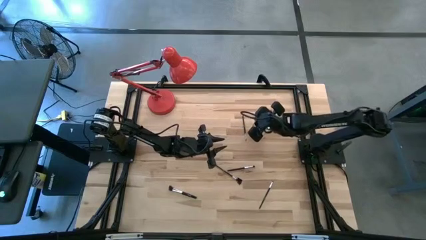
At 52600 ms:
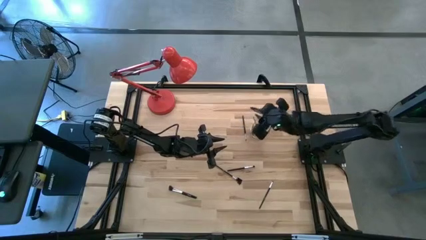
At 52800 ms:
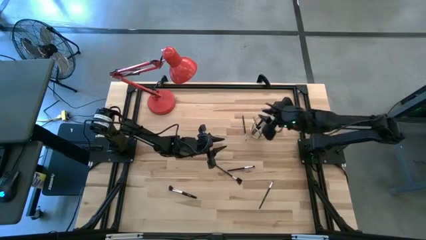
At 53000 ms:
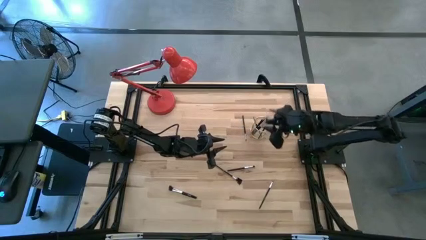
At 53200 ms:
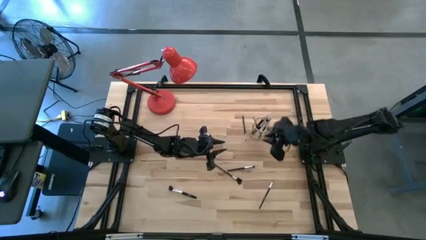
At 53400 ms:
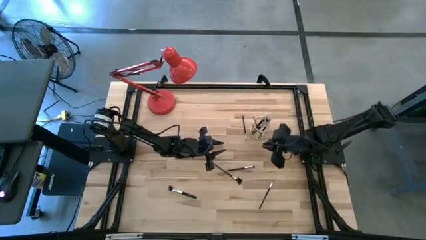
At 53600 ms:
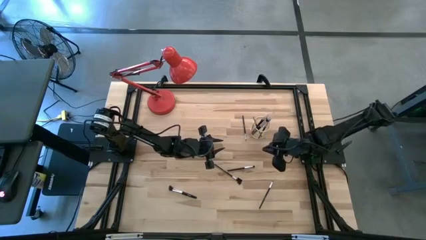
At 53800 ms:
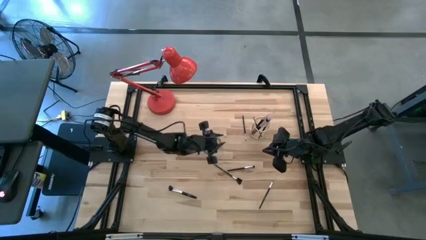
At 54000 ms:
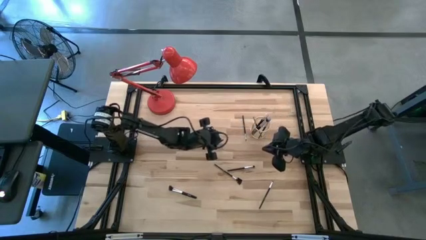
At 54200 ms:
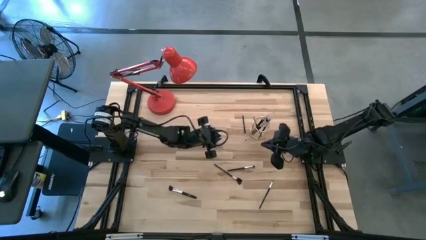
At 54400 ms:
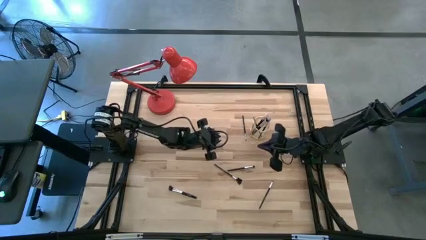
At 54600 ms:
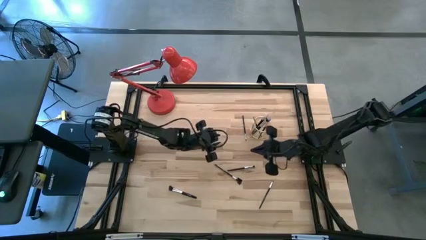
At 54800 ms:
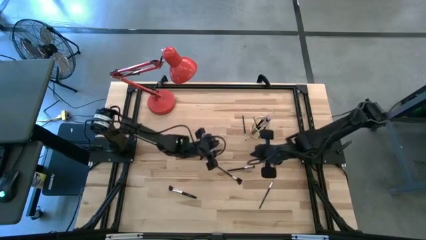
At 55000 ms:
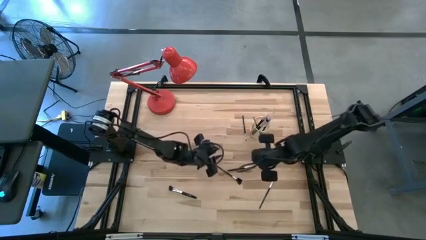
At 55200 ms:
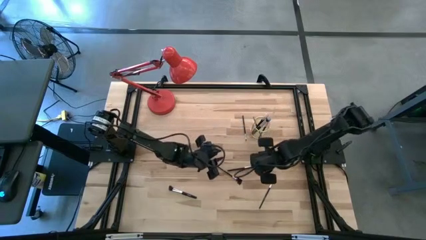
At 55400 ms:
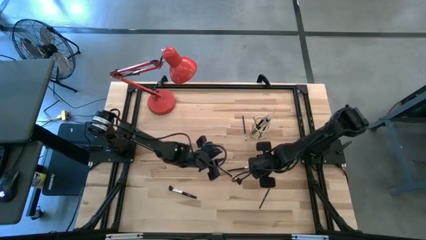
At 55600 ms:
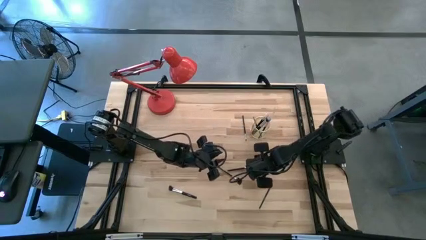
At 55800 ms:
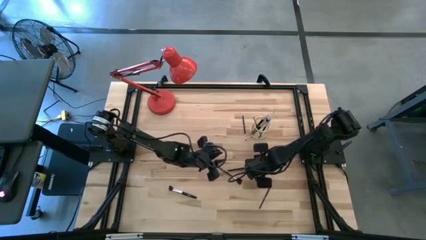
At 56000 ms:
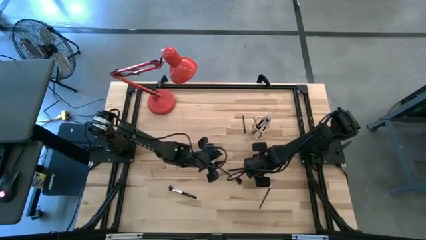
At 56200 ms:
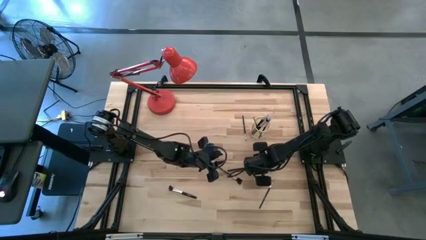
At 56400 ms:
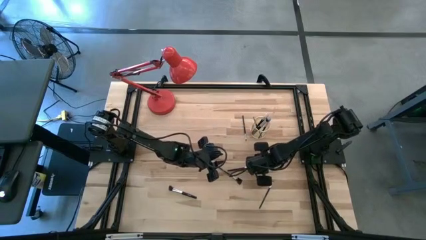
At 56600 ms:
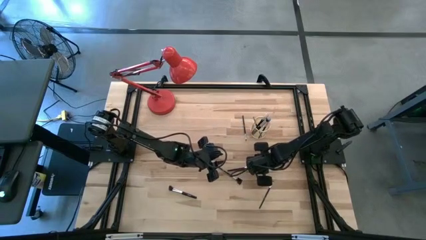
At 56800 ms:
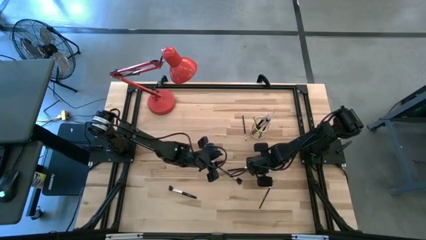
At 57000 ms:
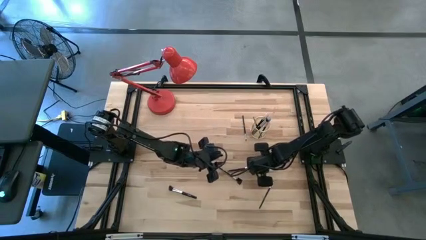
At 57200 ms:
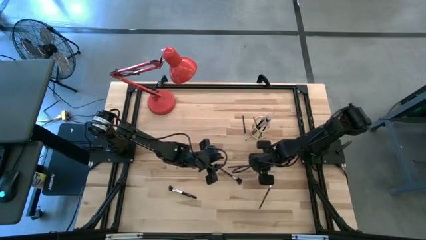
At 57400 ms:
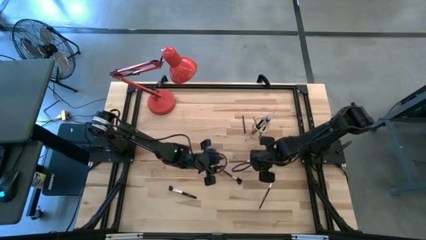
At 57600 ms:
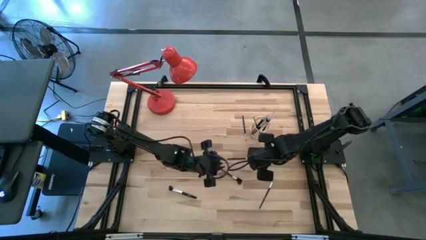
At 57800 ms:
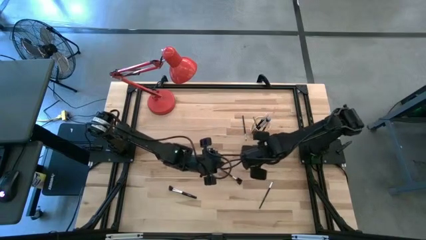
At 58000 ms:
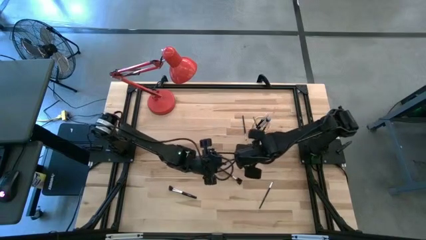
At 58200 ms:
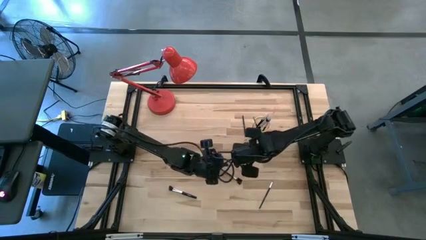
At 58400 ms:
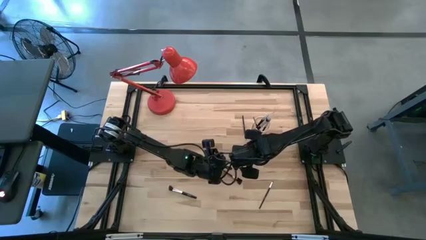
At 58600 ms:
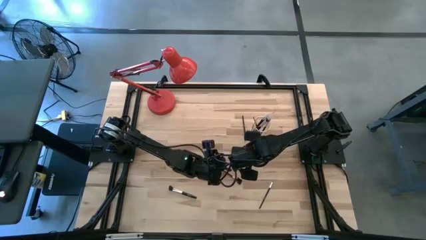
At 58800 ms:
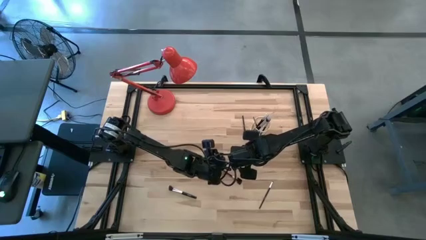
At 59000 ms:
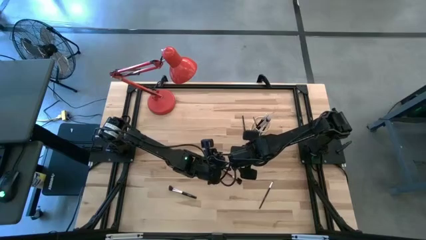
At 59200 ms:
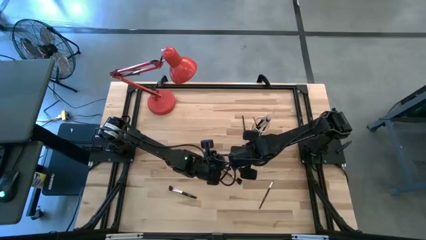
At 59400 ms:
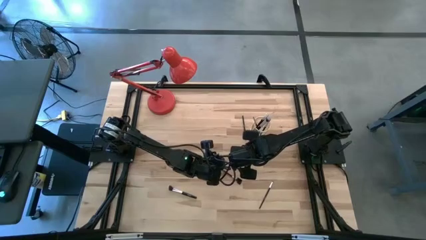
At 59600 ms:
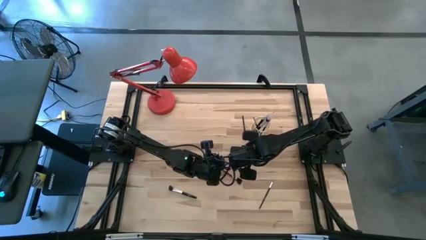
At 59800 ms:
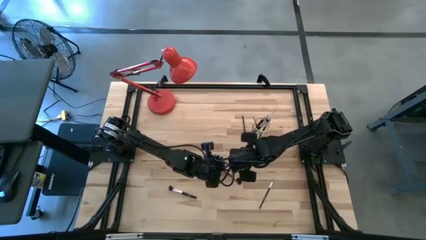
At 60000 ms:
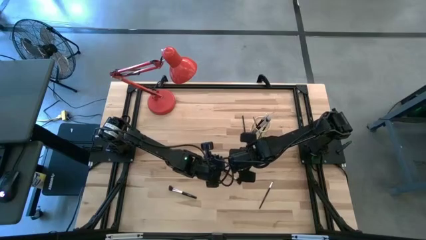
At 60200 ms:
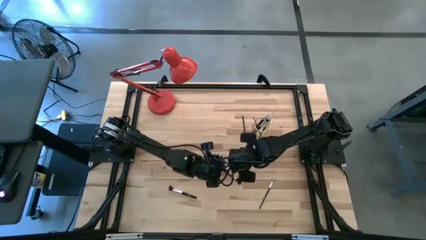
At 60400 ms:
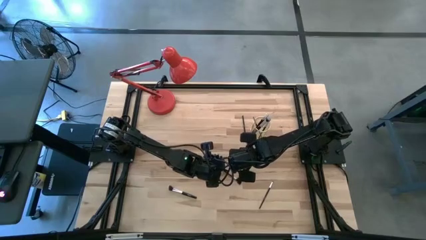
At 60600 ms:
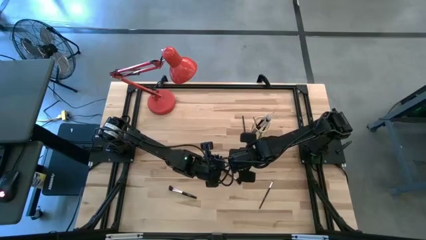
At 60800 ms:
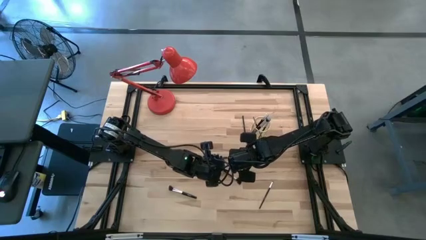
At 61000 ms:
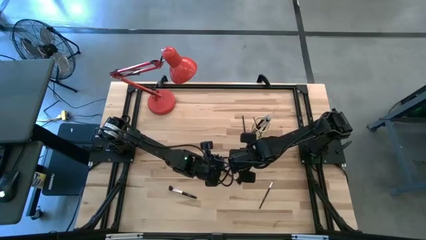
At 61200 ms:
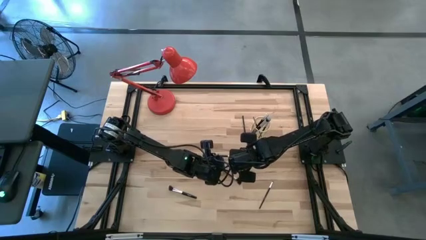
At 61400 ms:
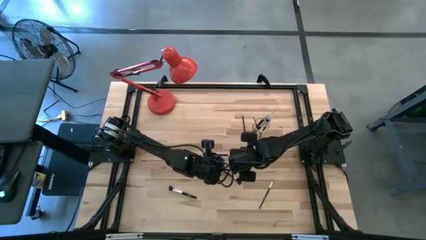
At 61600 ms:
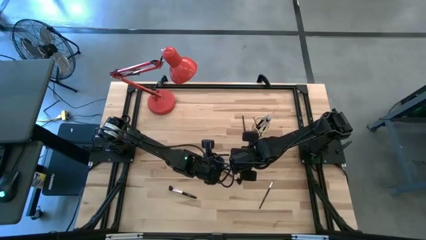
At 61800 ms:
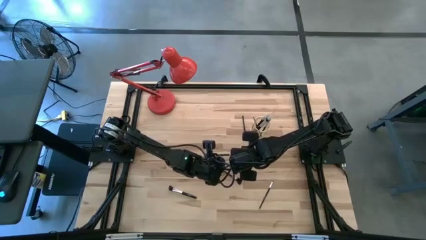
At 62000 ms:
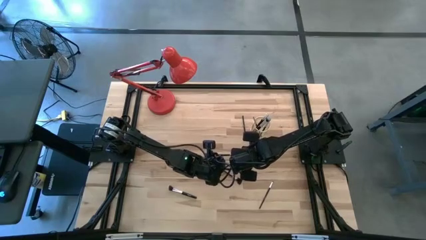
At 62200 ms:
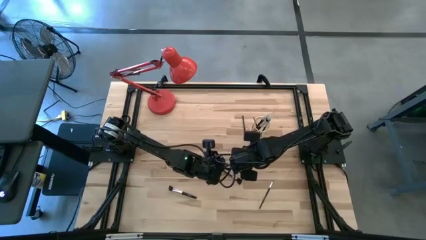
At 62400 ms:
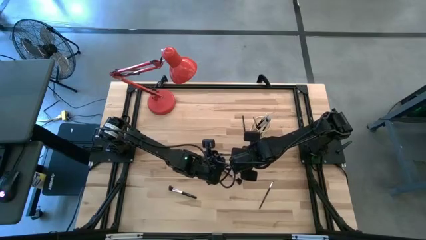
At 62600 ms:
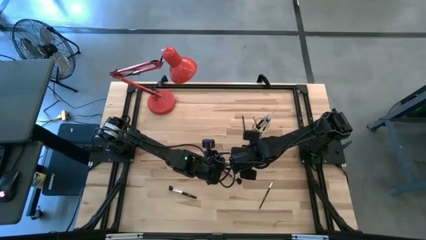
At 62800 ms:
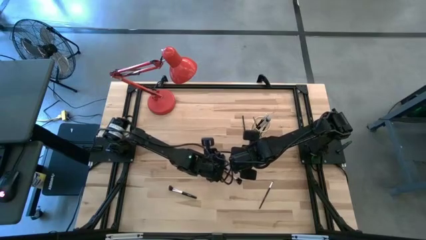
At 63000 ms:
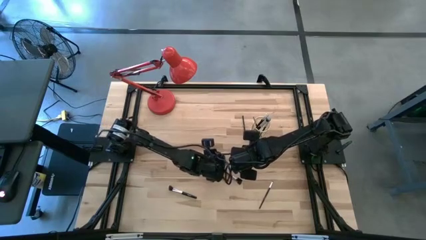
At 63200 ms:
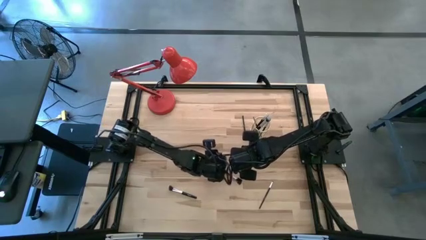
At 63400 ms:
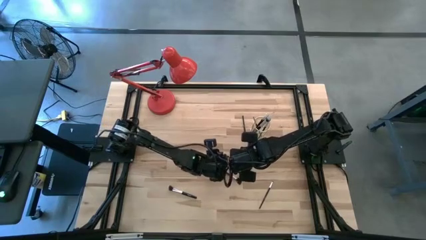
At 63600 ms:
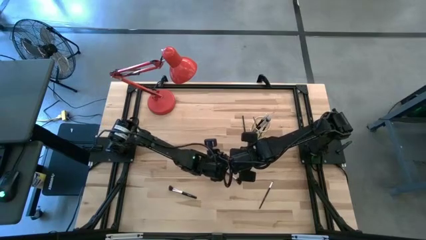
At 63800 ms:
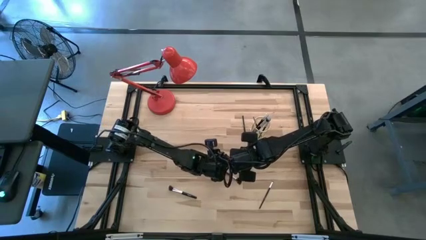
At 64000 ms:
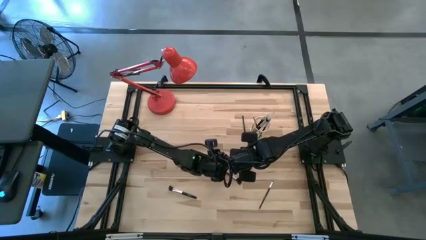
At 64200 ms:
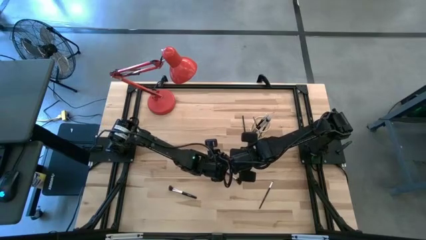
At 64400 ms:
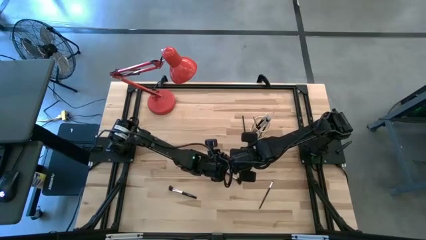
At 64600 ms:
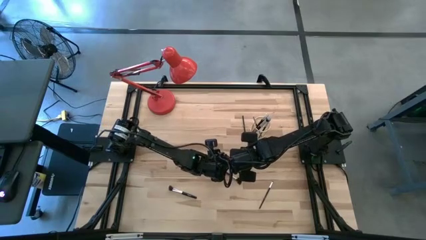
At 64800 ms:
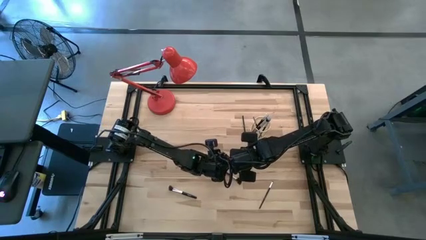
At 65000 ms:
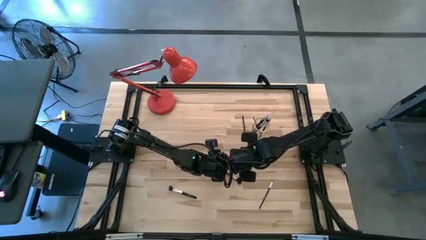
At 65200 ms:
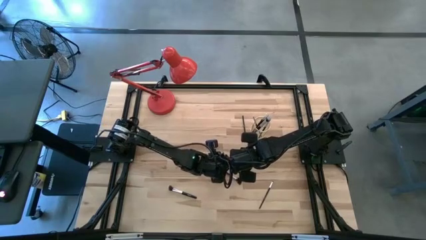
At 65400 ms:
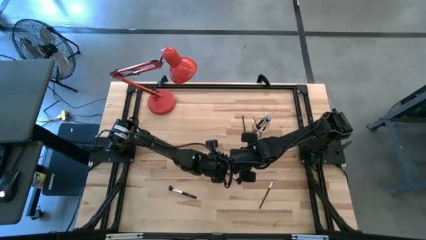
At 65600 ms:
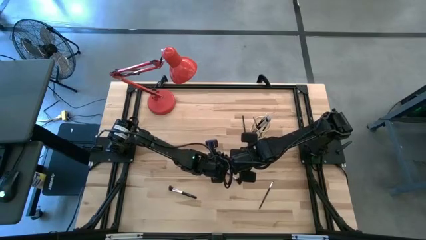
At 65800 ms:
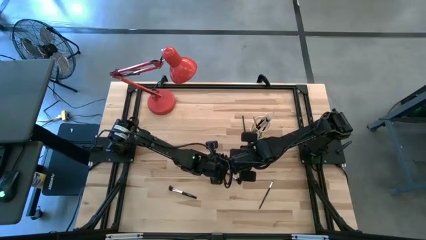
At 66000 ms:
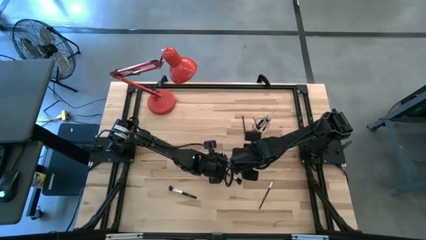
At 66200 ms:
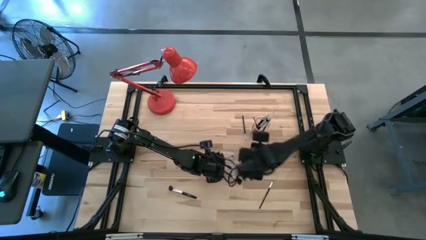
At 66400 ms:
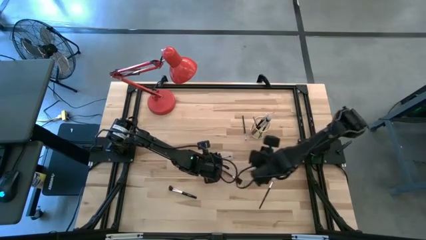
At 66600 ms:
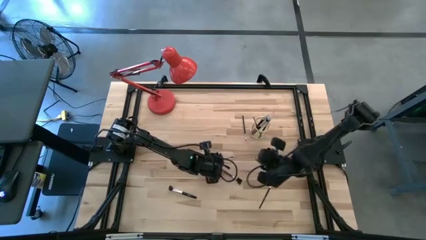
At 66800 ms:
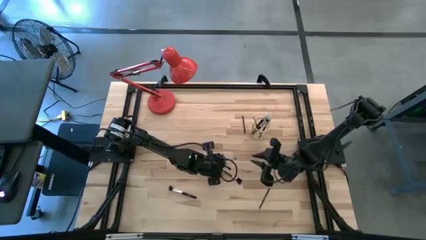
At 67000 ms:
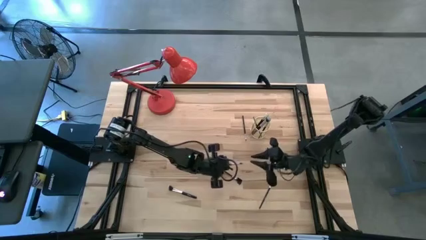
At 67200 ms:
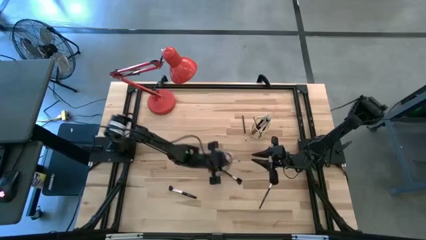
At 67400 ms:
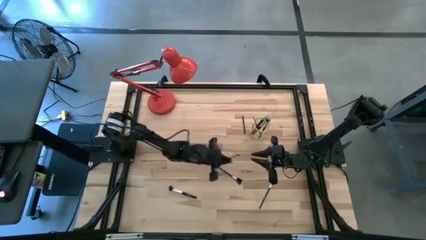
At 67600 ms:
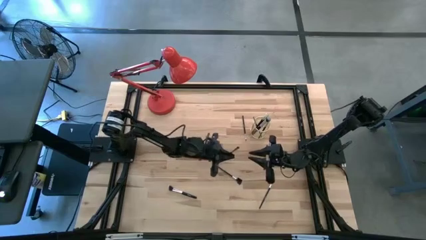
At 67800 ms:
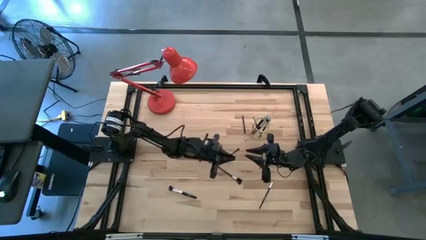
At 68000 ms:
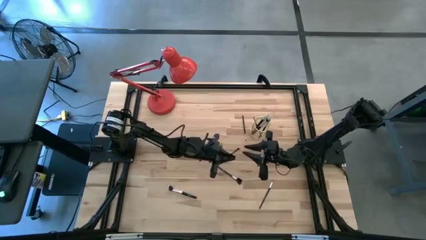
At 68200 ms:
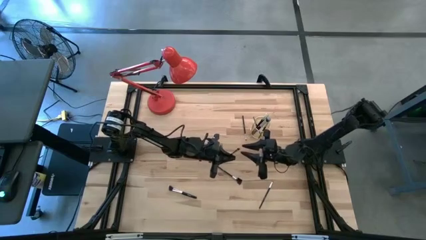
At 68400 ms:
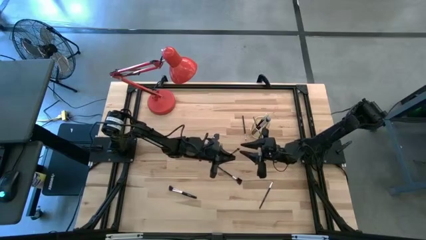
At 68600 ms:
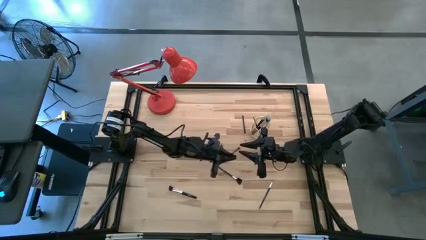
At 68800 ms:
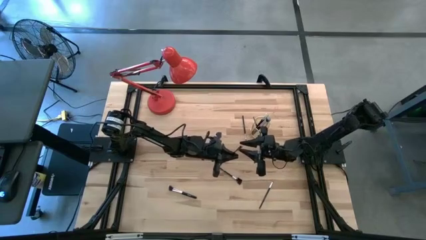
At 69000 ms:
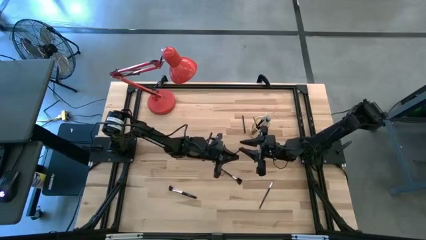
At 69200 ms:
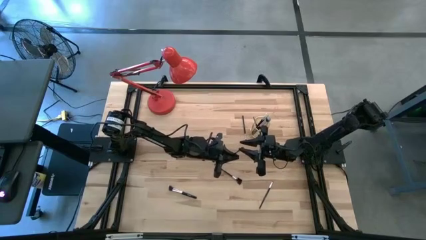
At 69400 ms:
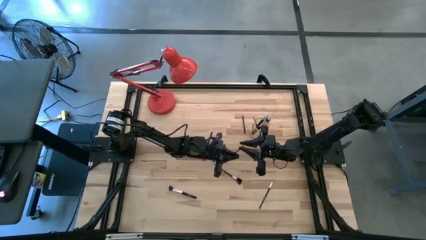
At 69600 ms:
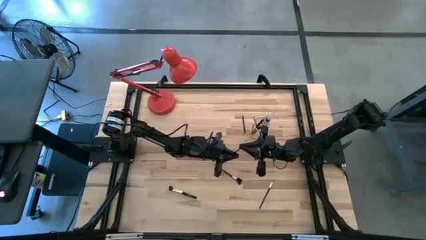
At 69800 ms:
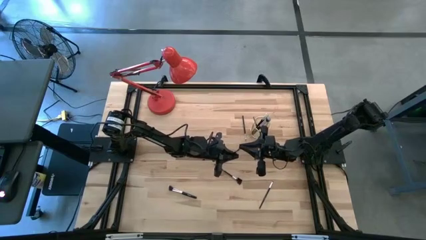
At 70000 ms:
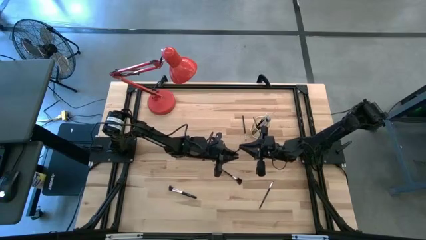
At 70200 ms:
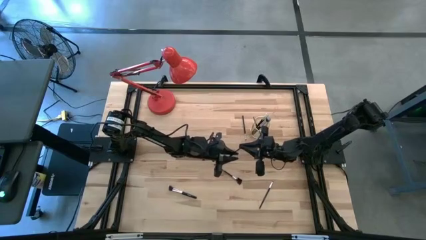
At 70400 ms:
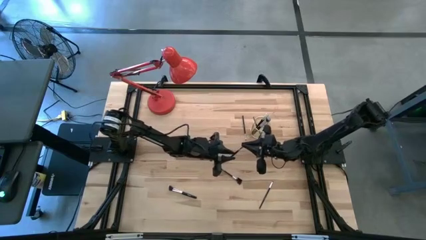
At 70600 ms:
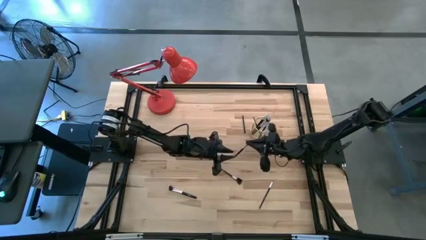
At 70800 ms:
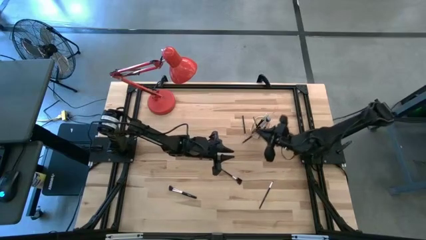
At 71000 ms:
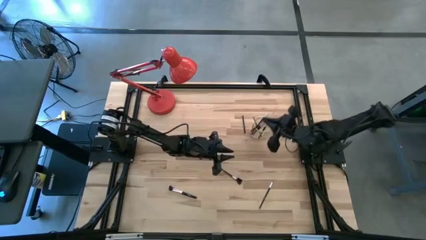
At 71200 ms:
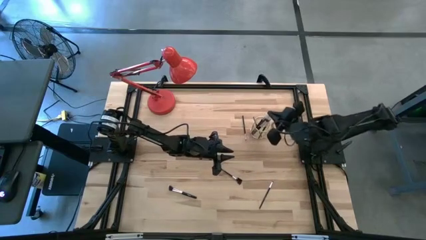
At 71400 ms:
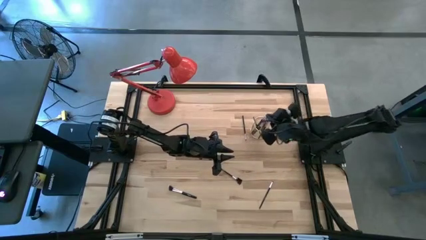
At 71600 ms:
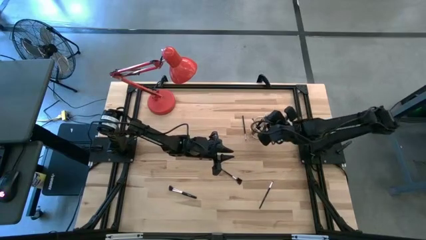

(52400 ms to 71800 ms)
Task: Put items in baskets/containers
Put the black brush into the gold holder
